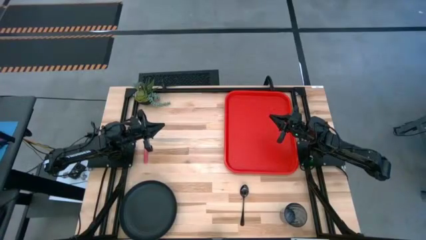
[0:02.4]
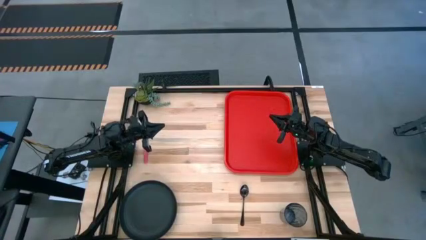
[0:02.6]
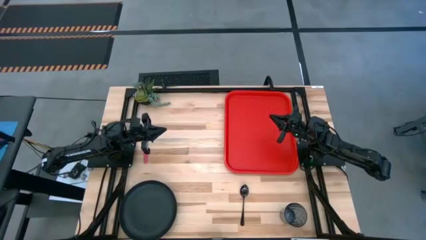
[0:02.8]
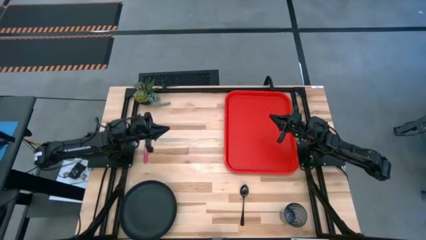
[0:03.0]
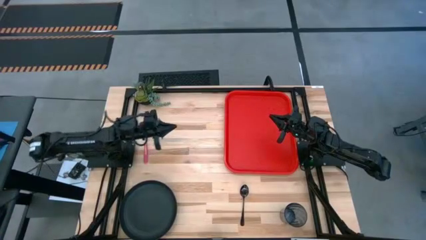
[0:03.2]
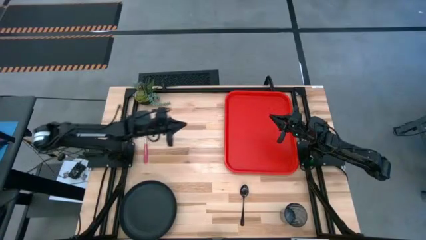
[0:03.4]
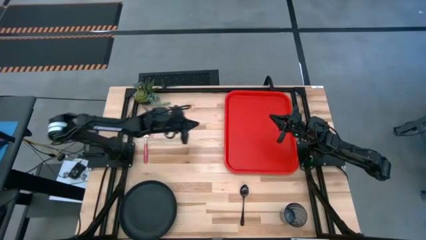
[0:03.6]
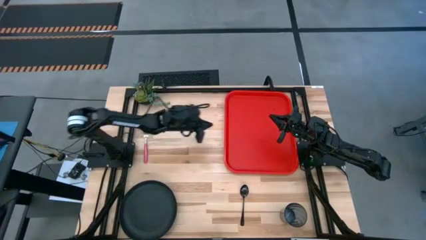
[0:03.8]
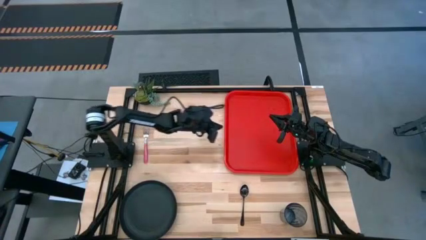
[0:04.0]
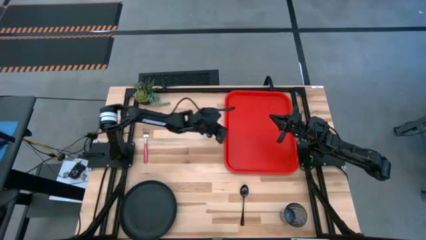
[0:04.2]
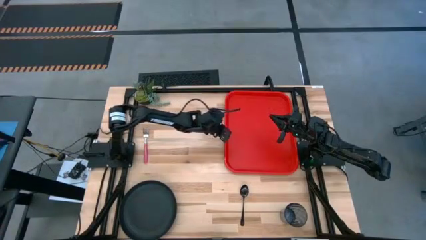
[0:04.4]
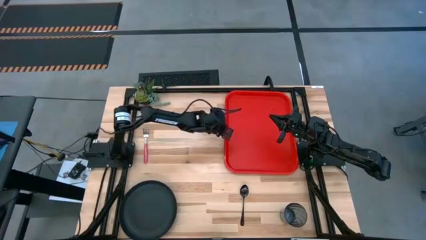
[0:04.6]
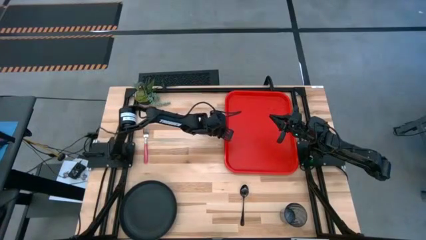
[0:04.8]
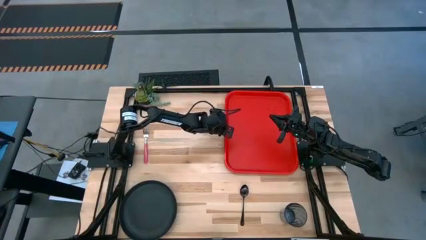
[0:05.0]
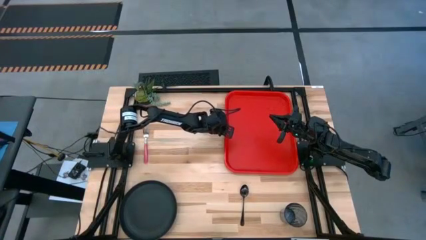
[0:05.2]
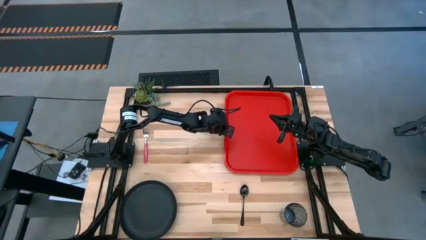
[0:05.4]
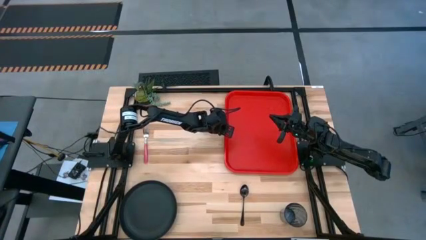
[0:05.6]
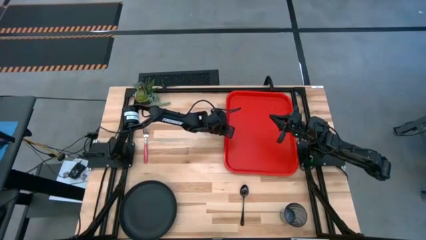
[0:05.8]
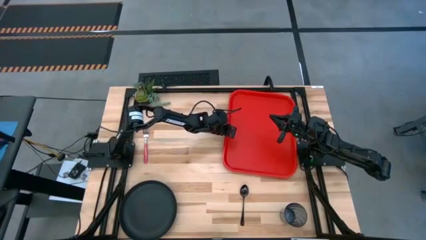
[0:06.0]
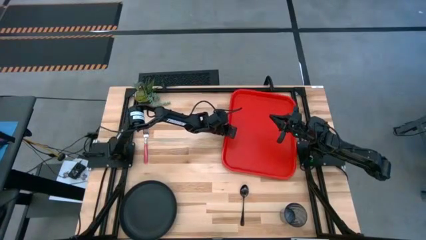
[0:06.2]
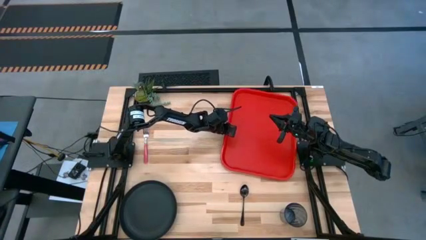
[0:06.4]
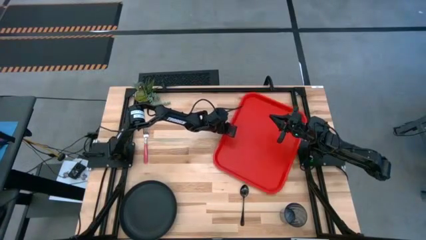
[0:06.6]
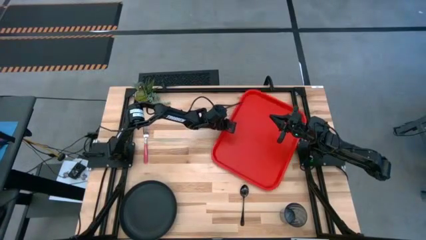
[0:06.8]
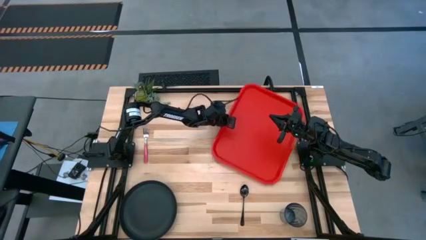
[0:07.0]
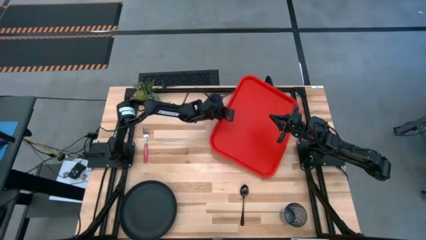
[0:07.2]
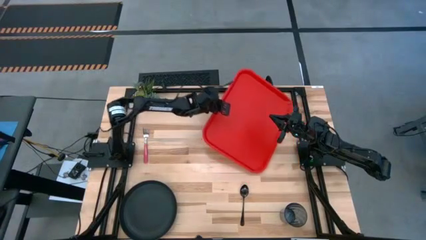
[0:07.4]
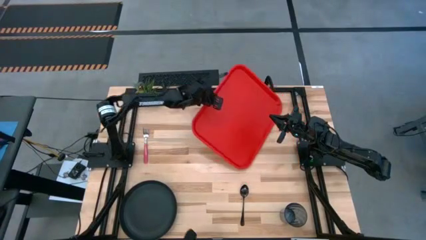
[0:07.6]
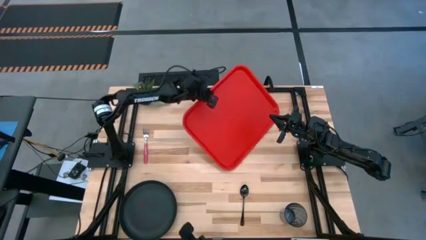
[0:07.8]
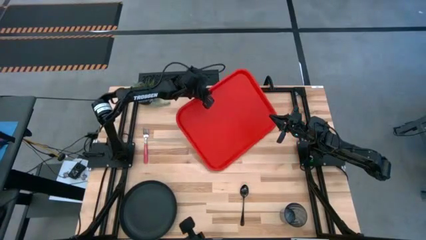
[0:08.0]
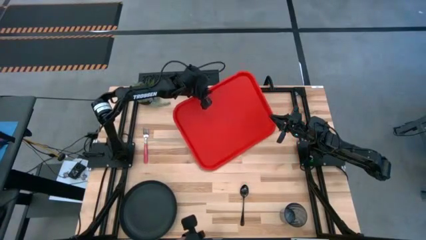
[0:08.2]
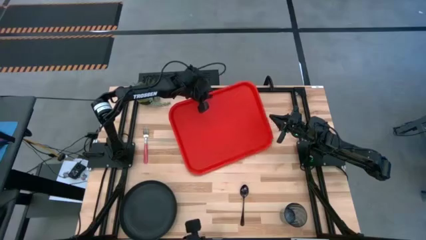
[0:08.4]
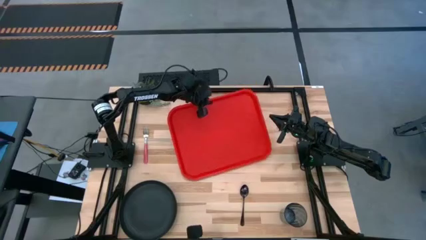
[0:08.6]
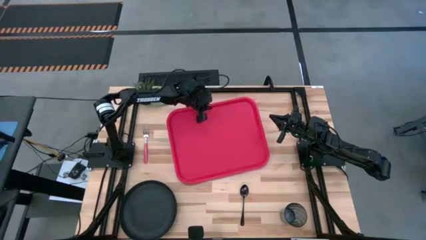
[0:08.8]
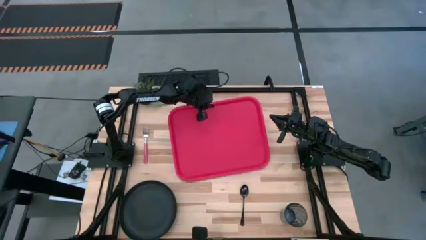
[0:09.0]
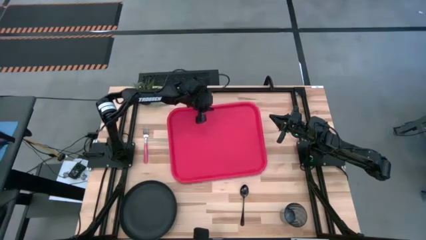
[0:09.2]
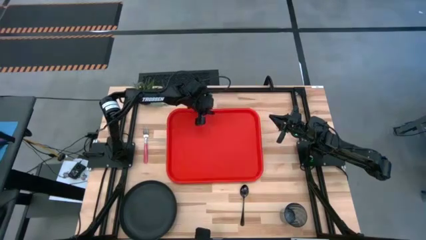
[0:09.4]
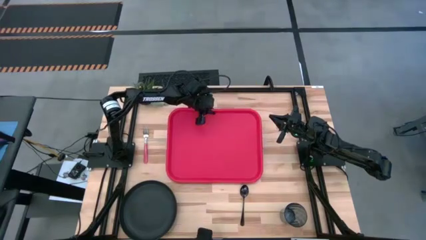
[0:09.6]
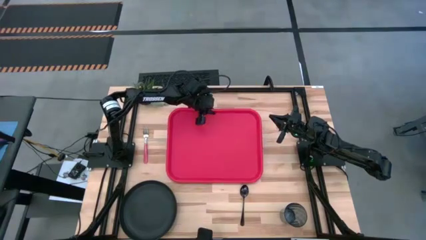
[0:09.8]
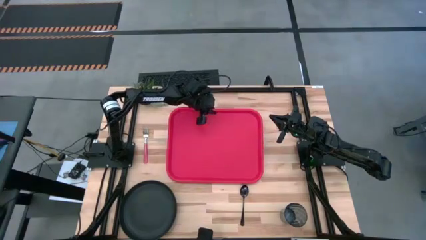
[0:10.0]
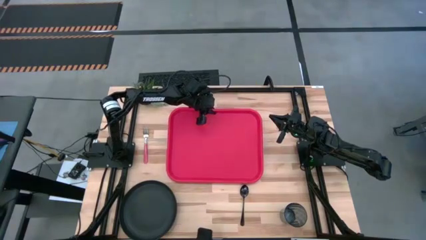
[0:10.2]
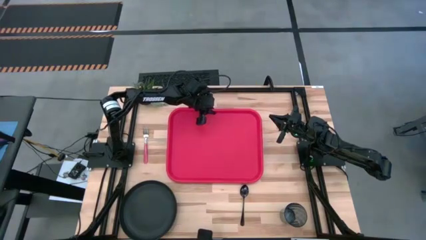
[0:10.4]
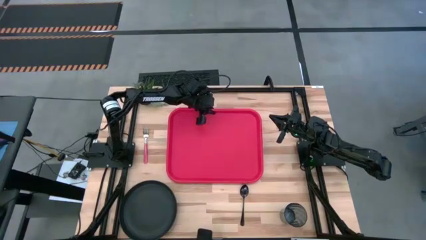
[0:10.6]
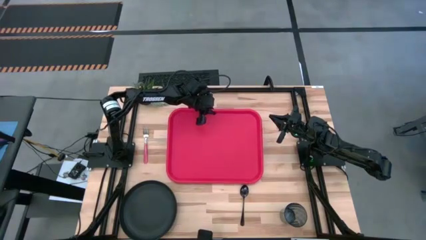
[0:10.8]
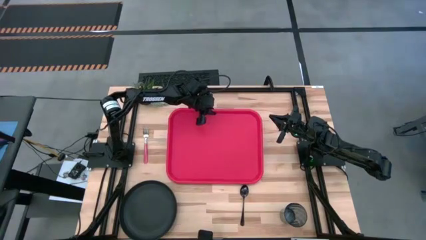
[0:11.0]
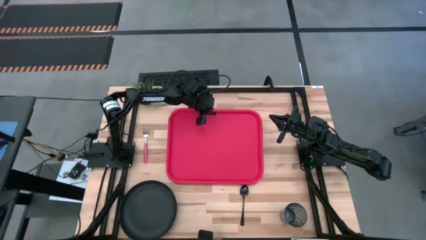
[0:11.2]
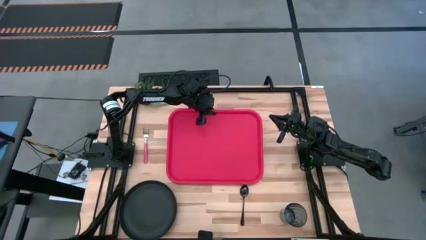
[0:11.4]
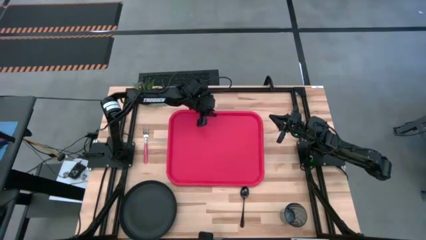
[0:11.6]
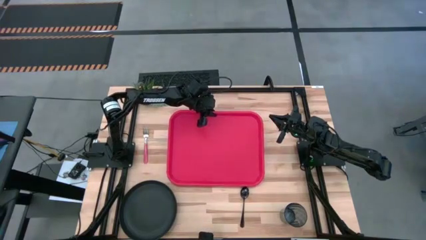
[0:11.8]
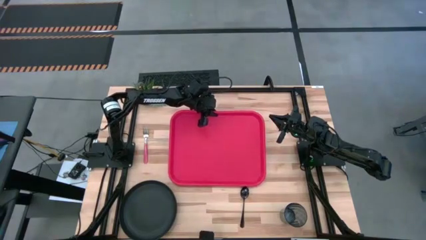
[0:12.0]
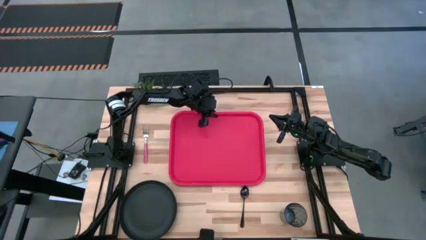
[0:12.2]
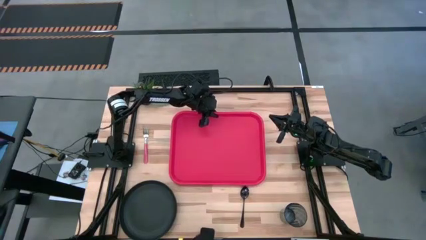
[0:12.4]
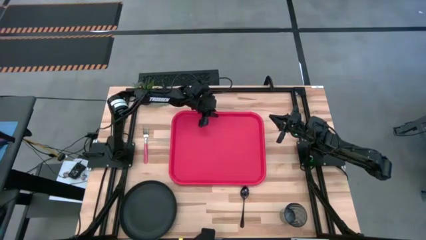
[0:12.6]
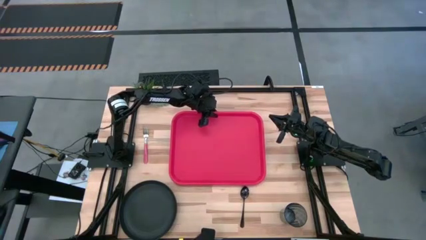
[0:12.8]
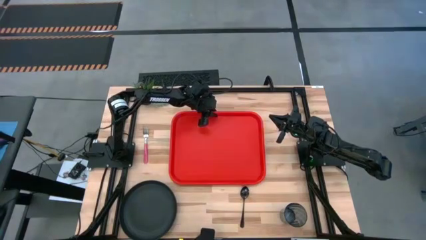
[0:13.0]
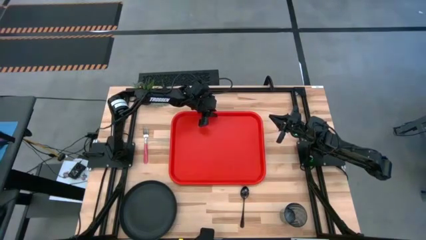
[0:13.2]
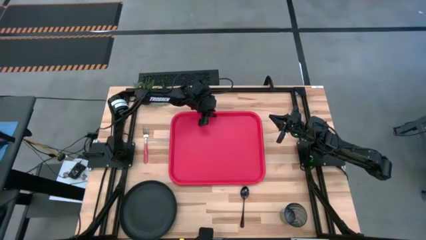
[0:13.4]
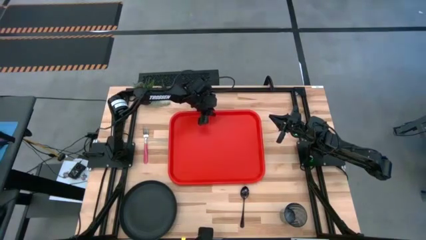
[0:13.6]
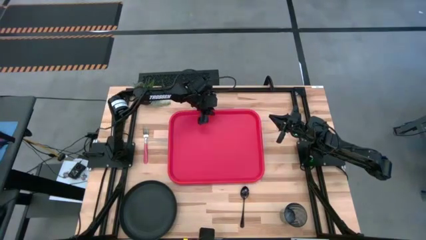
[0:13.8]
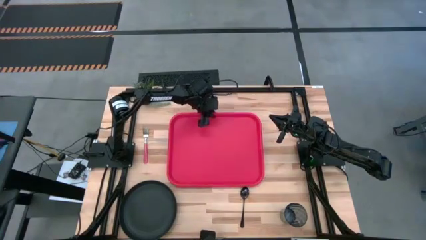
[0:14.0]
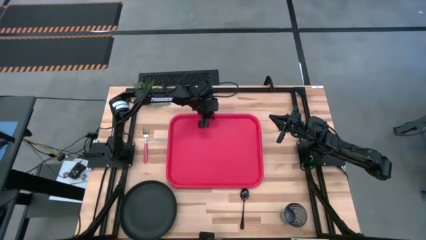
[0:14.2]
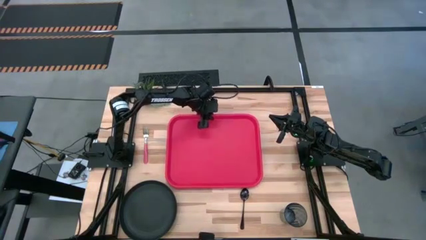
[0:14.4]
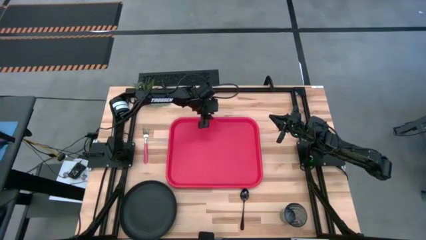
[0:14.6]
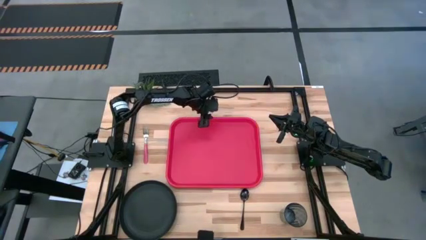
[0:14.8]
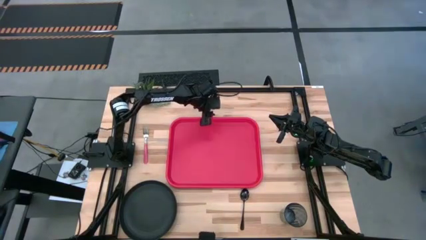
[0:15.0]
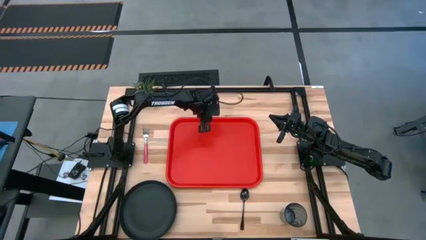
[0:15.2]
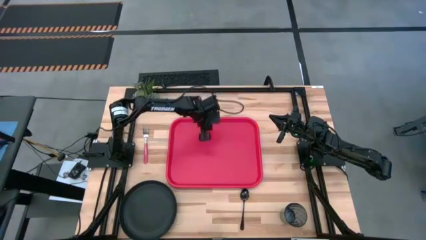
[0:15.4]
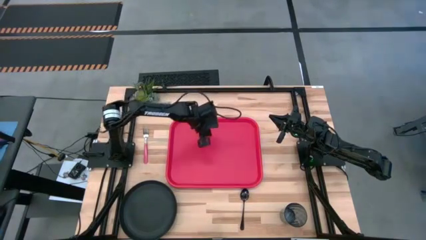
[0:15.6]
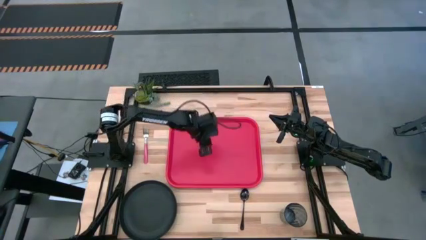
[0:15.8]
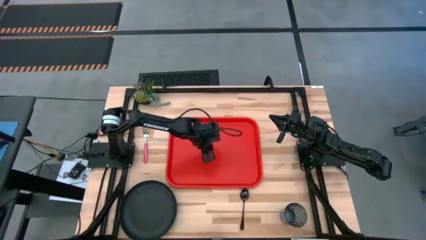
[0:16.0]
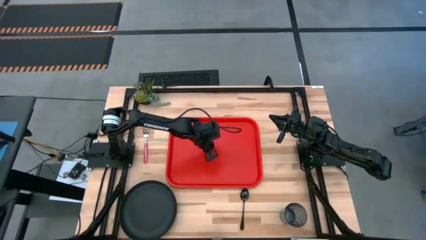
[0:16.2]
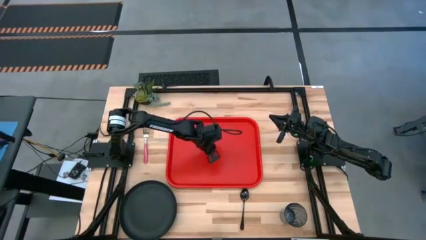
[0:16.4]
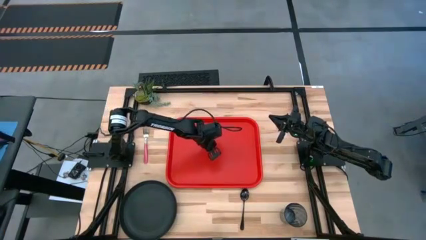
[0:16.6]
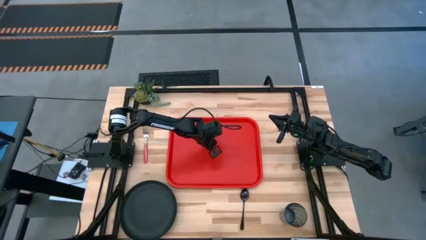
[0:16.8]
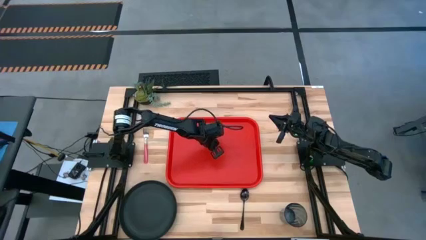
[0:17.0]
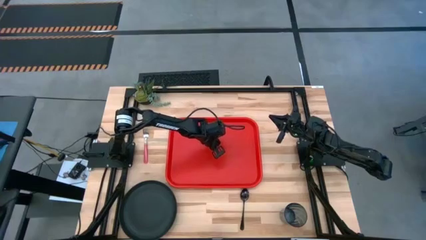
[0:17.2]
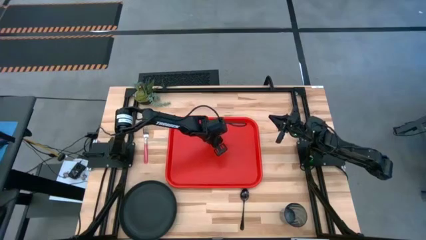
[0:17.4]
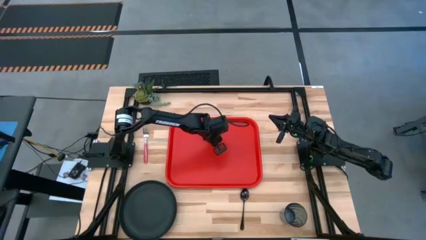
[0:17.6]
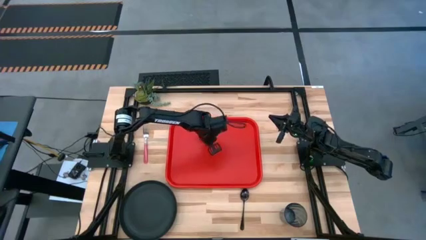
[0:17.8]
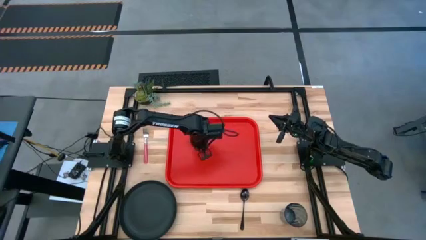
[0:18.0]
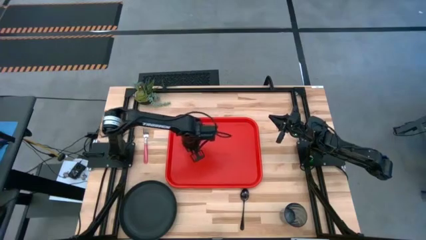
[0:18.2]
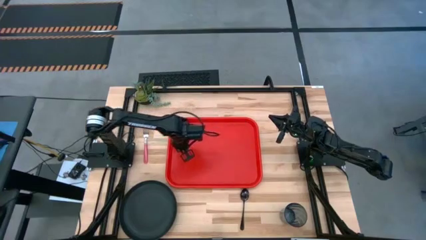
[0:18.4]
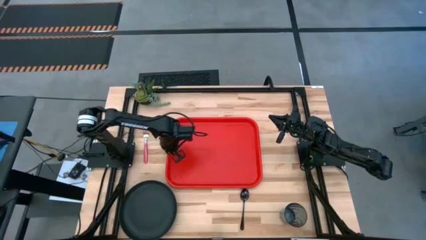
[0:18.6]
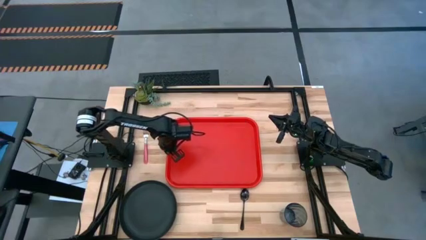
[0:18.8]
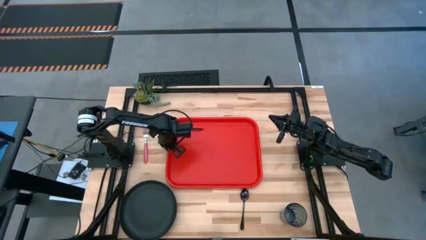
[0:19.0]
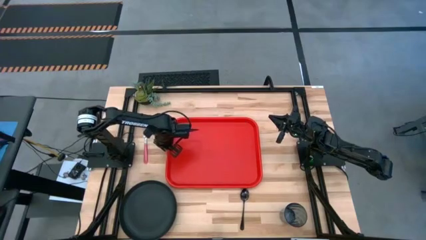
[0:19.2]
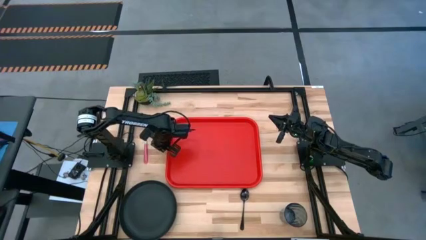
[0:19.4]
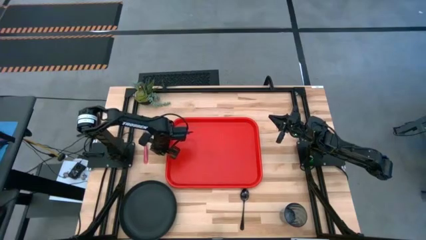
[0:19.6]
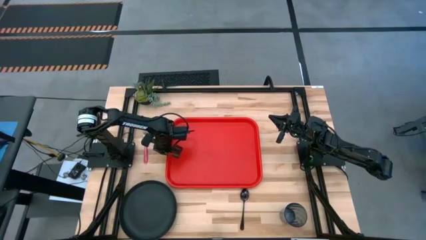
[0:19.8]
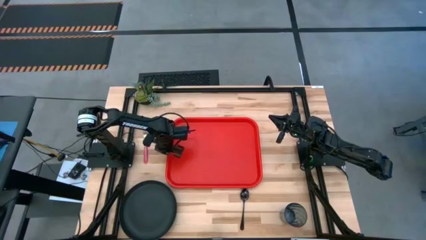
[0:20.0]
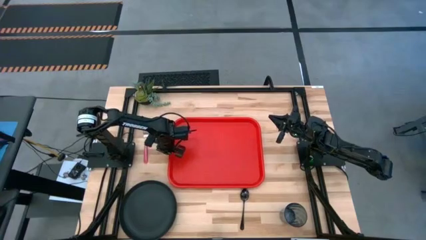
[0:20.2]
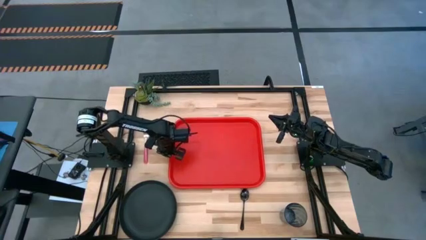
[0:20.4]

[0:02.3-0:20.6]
Task: Pick and place plate/cup/fork/spoon on tray
Move the red tray to the center of the table
